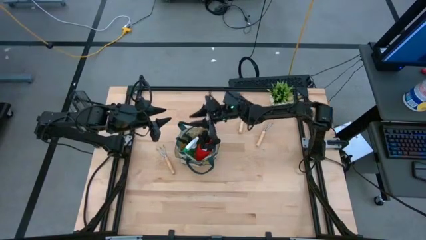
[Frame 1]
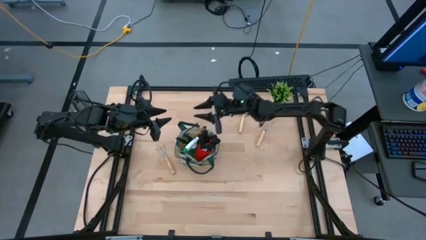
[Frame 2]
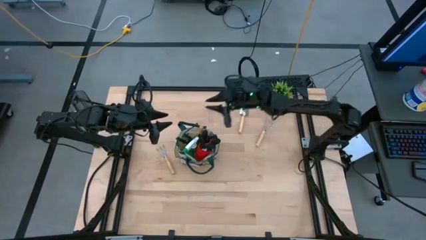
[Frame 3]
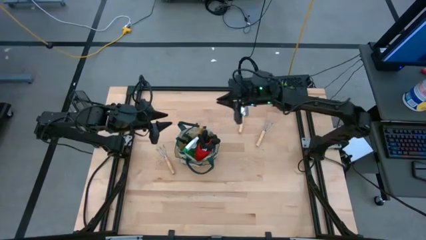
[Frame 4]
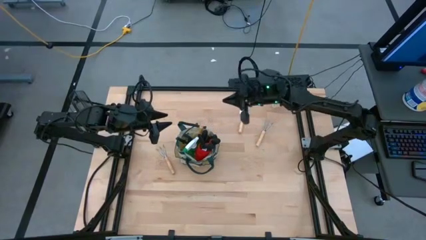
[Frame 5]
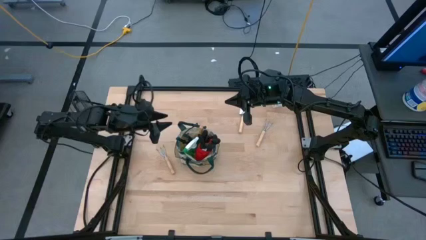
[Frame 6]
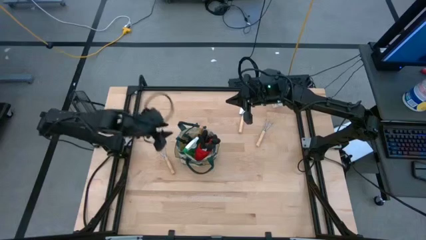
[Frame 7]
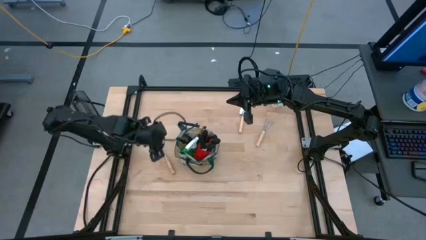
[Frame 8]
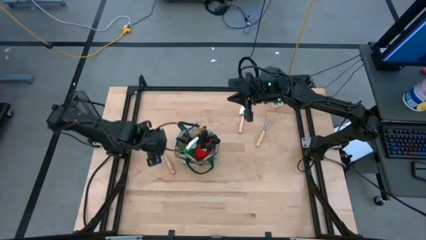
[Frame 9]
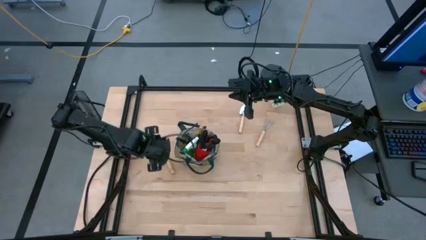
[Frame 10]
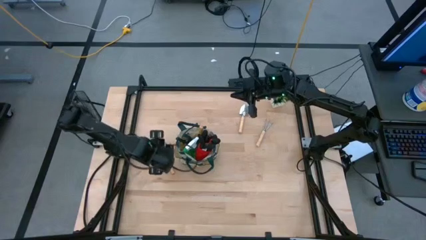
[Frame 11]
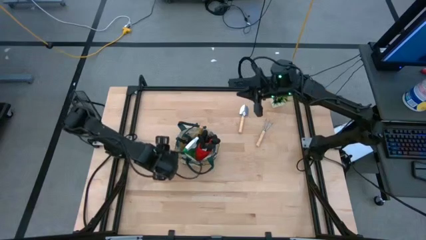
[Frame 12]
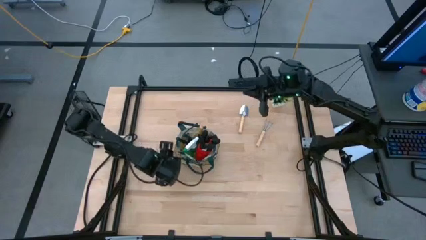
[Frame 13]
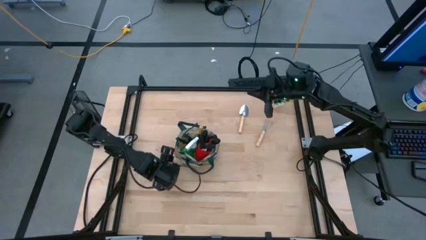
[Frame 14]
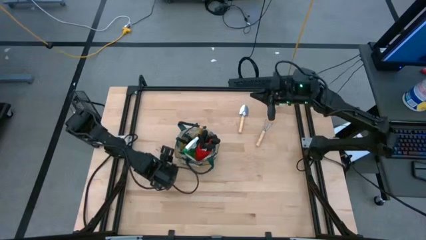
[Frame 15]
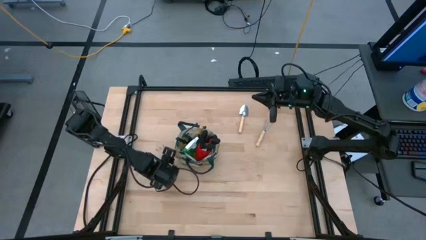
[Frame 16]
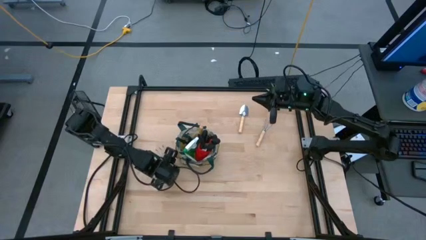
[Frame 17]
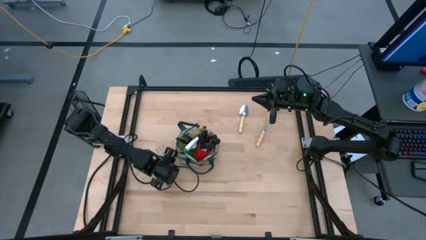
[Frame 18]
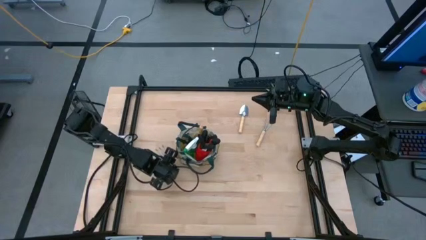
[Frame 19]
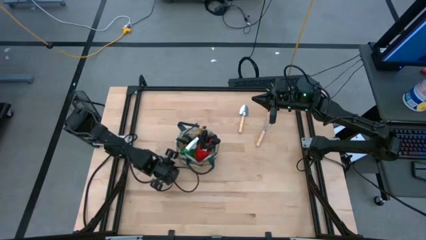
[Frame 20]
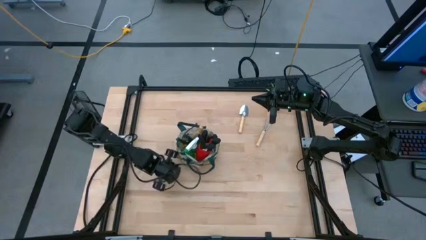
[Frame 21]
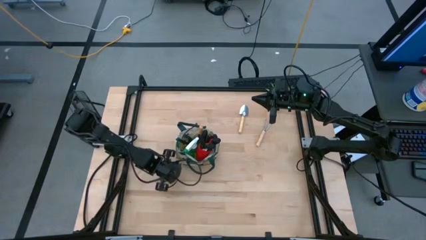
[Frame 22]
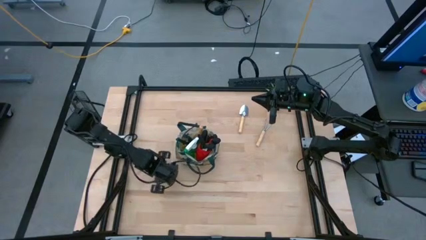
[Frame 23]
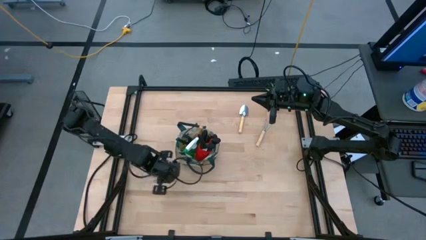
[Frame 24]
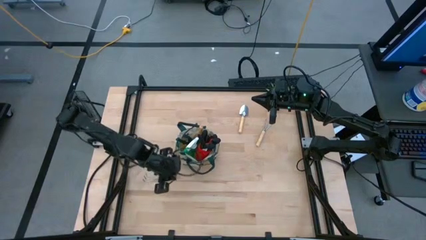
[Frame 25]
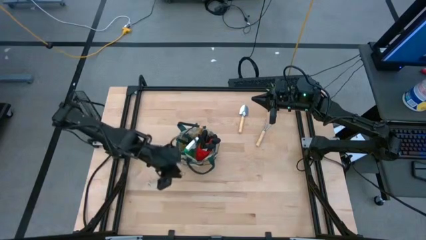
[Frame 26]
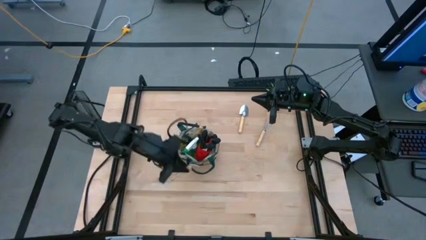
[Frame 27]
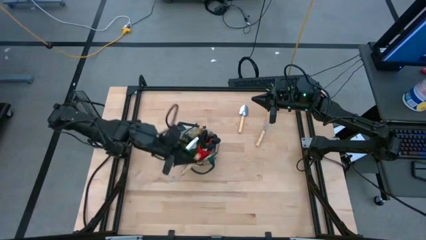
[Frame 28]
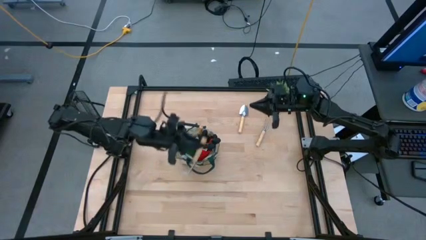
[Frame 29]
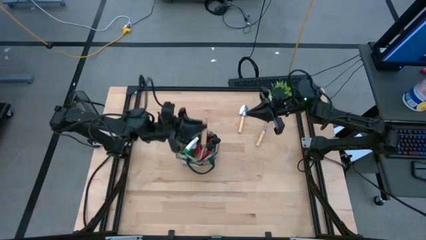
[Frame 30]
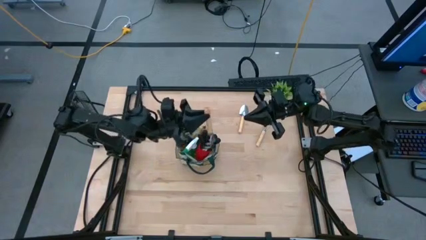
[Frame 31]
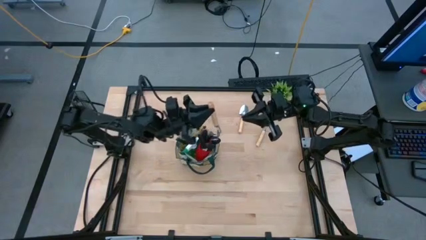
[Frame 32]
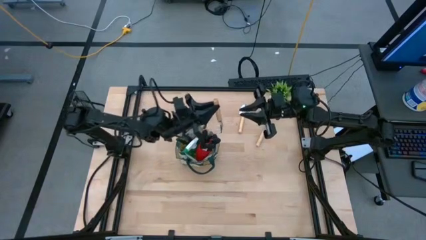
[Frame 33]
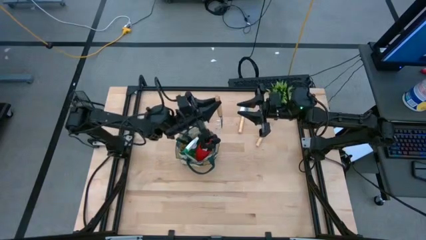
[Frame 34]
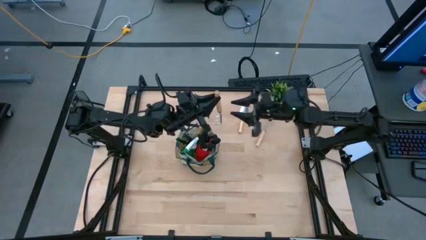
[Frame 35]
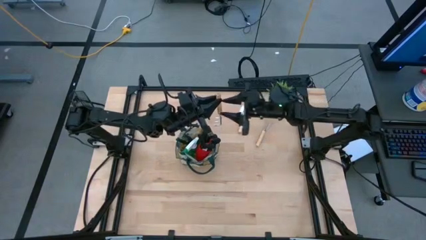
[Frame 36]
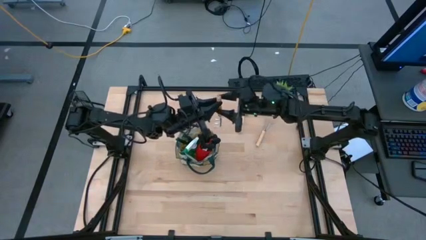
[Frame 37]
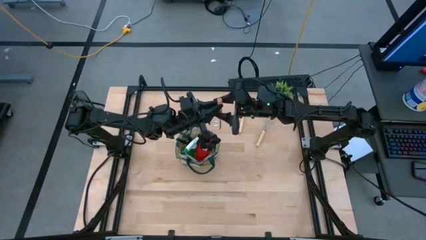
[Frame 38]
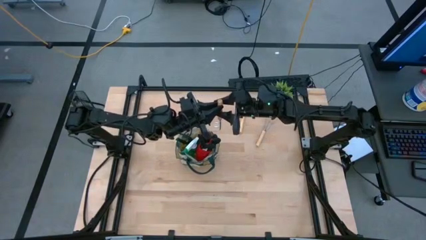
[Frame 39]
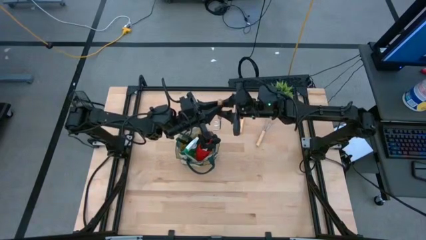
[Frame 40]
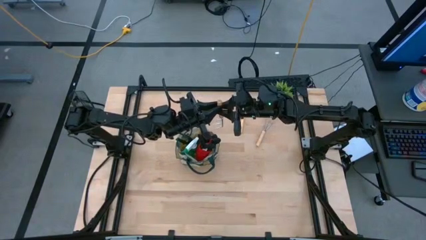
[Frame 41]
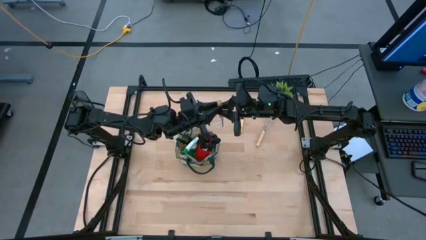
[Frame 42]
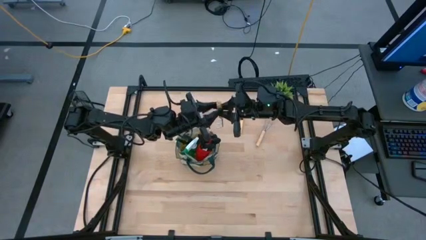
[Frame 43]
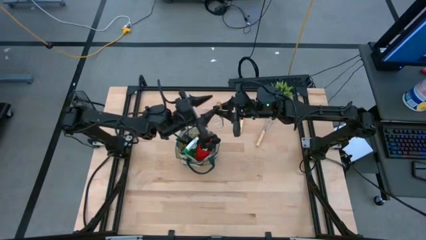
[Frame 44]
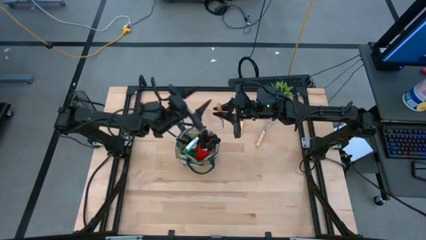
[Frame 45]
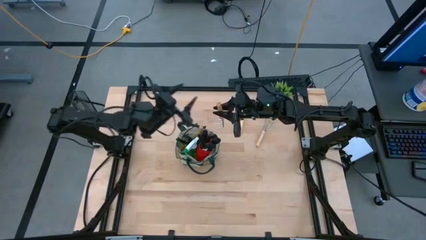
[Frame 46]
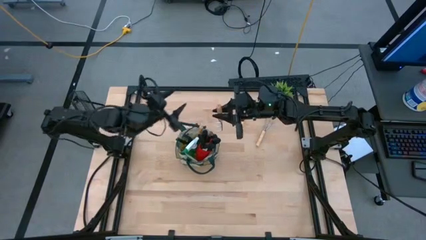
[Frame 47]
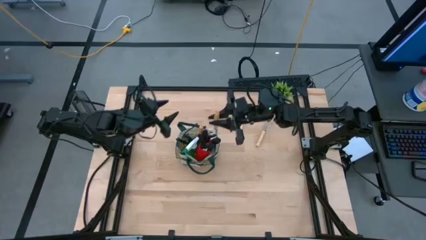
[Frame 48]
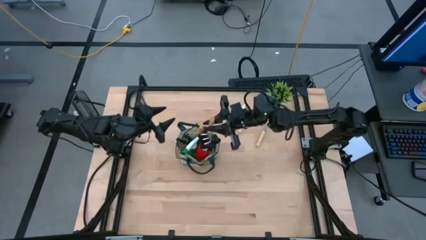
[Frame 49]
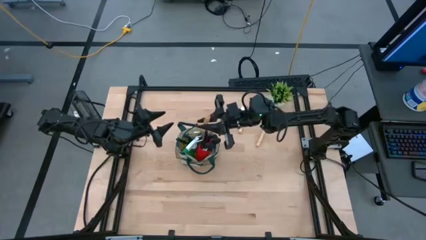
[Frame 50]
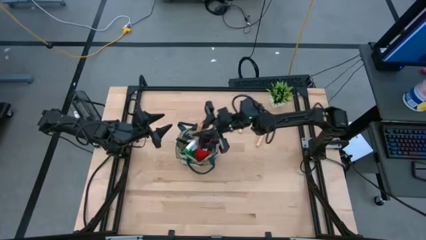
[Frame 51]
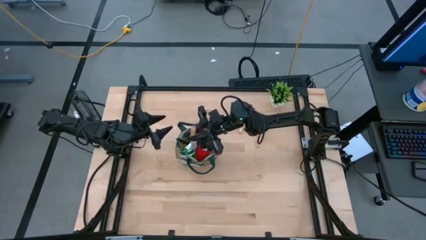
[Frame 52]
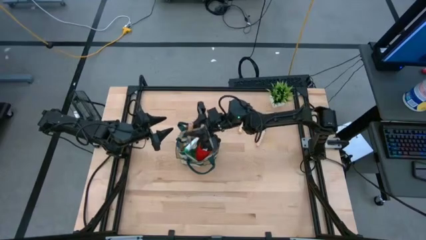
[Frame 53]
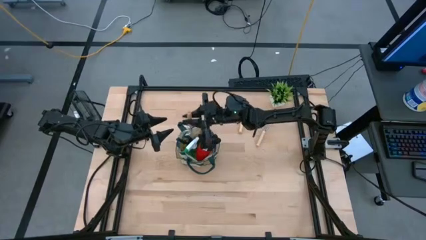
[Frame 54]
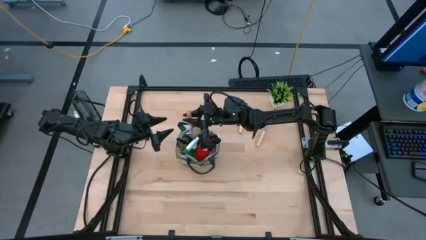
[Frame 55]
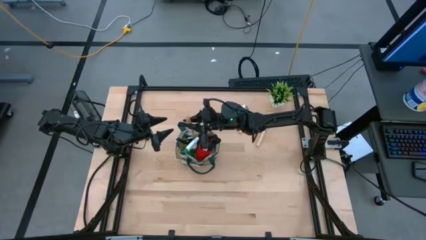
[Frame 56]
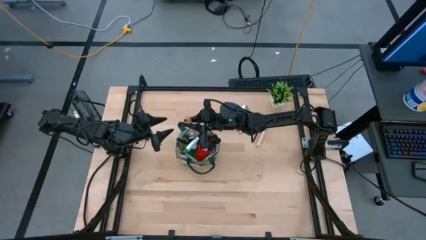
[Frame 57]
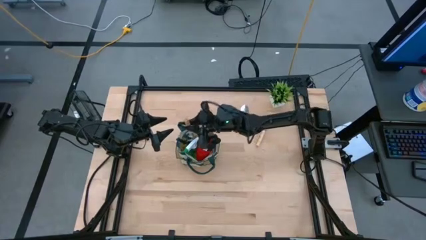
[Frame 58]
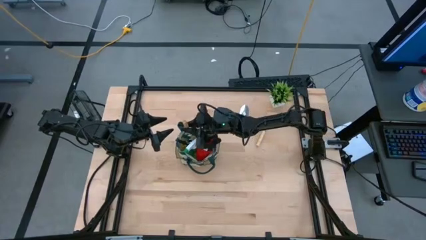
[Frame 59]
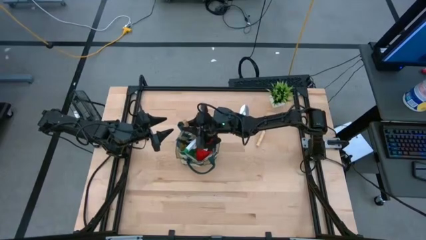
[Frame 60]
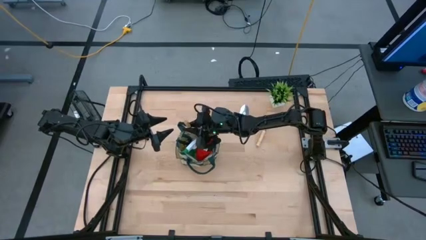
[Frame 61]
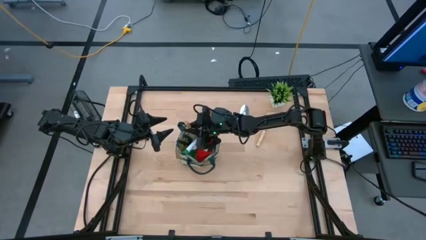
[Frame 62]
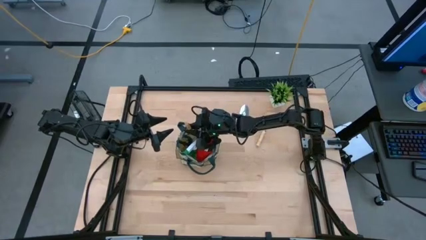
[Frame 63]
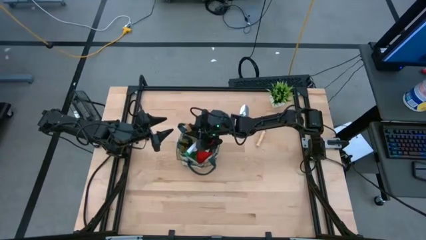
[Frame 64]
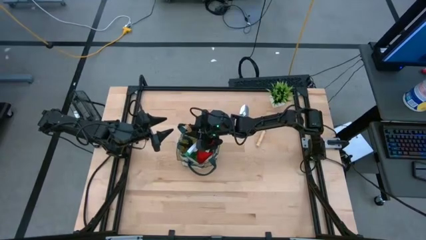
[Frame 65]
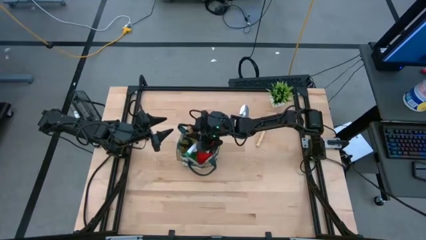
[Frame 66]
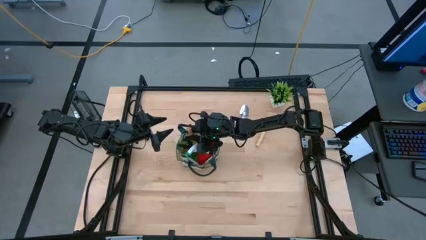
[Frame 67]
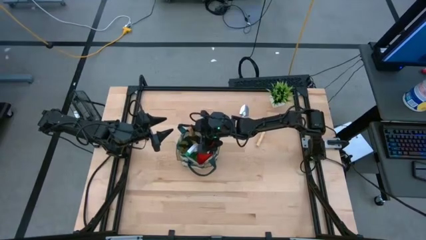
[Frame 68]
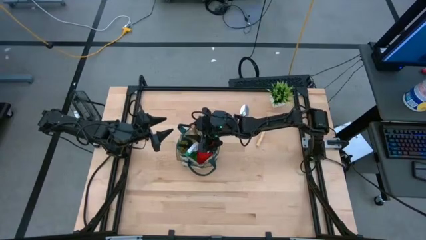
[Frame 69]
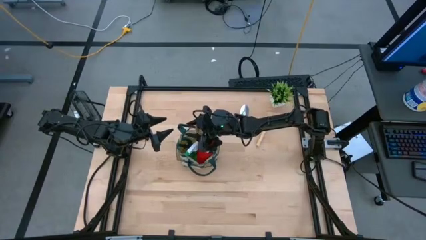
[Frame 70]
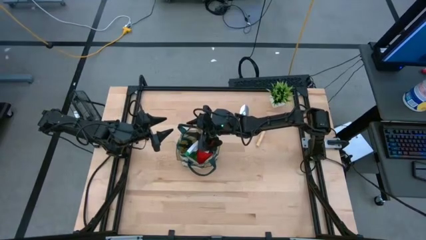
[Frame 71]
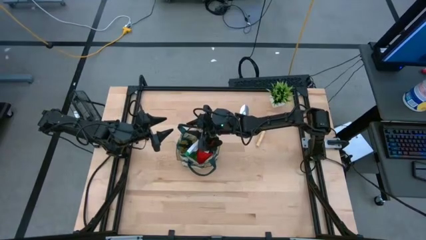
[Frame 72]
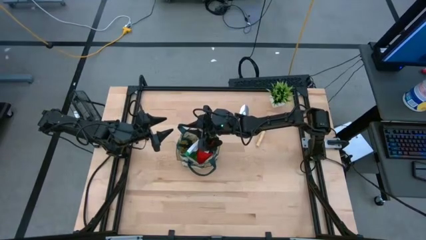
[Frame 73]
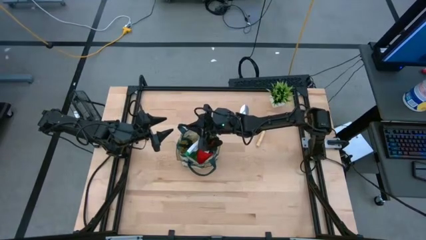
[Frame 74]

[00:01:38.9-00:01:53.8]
Task: Pick & Place Garden tools in Gardening bag
Put the left brown hand rake into the brown gardening bag

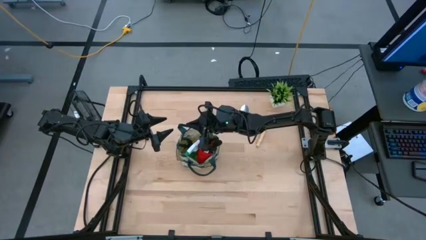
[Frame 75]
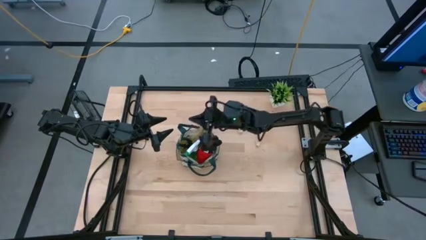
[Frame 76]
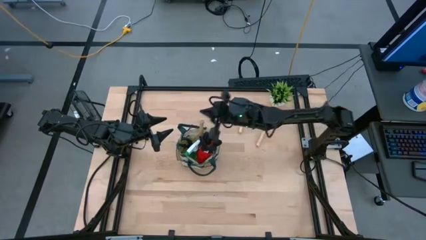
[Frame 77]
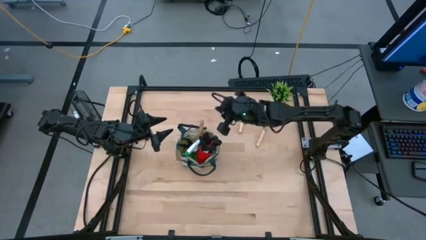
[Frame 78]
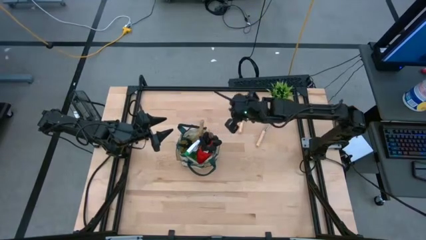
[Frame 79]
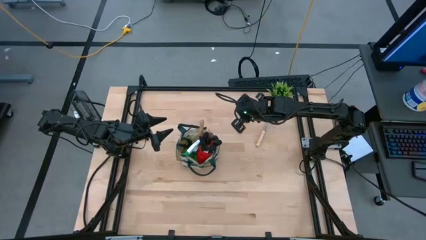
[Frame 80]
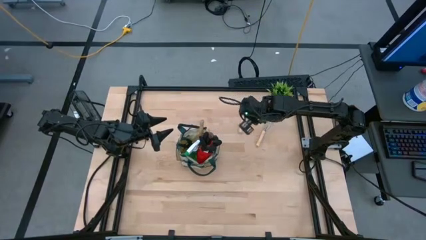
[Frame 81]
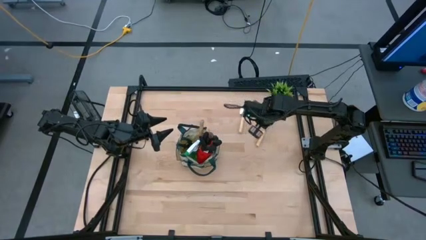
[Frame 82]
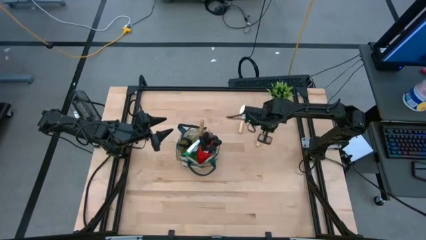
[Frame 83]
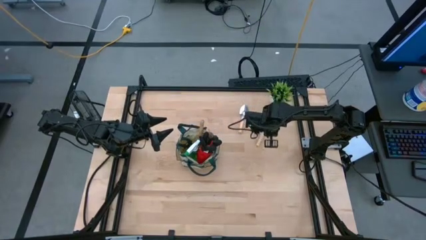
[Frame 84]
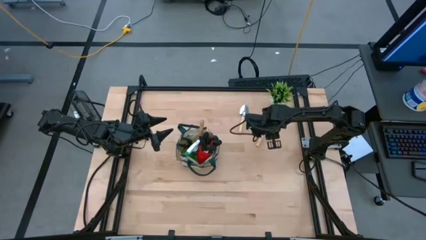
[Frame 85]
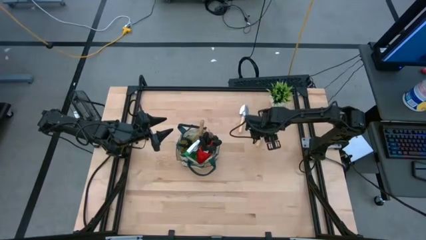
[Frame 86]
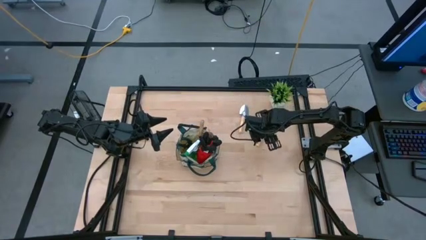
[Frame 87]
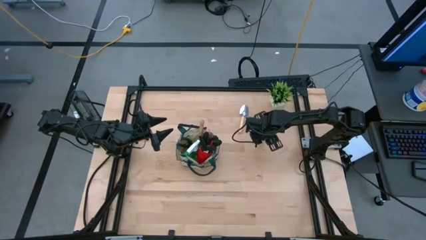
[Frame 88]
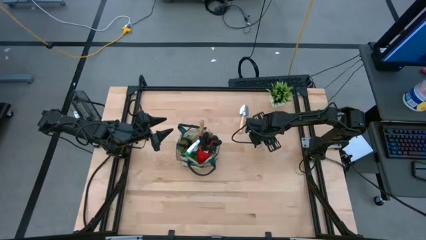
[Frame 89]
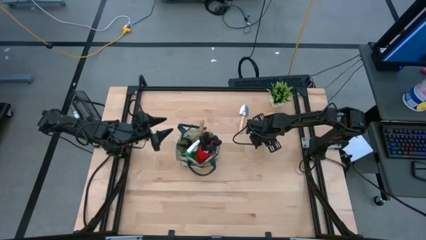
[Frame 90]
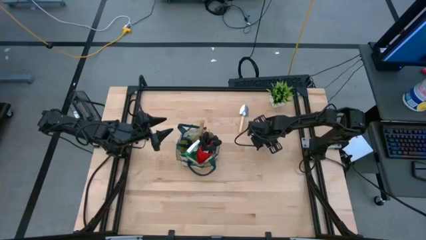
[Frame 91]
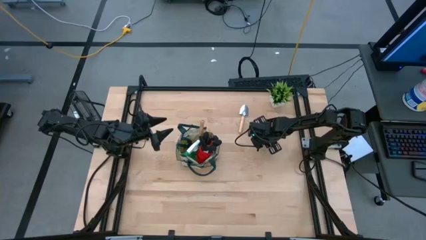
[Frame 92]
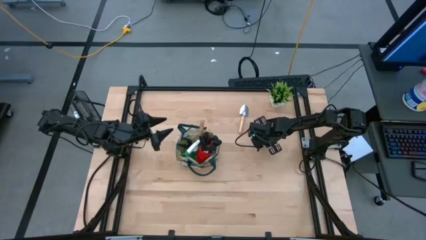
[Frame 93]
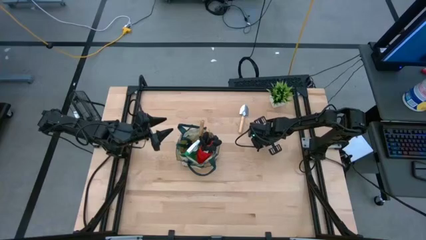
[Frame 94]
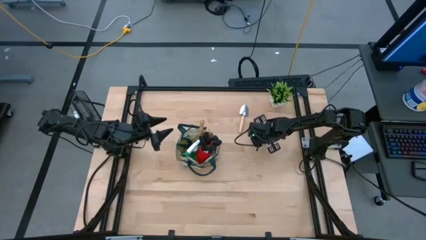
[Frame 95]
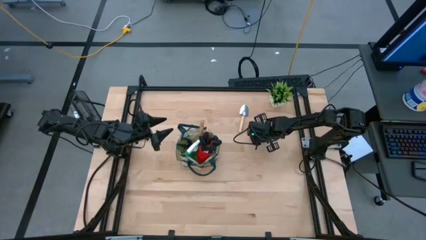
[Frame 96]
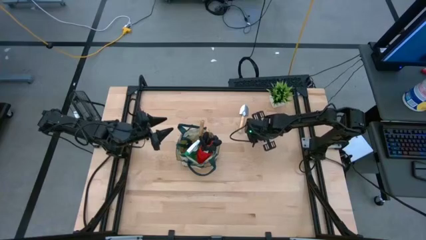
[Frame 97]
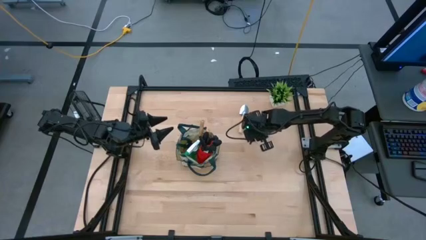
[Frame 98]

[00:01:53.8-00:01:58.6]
Put the brown hand rake into the brown gardening bag
